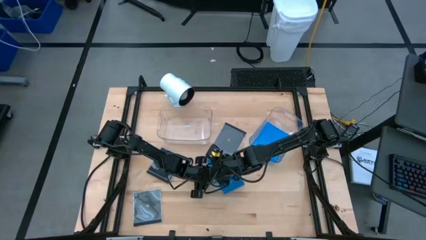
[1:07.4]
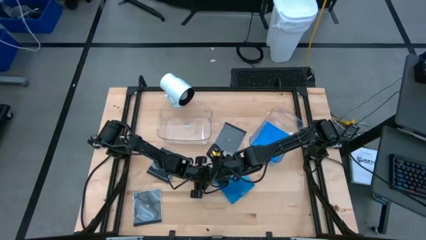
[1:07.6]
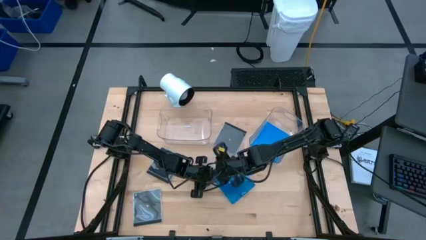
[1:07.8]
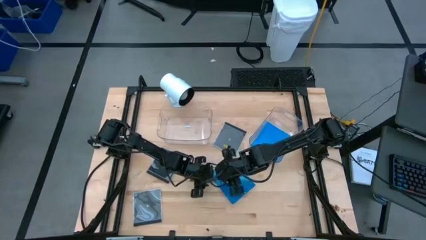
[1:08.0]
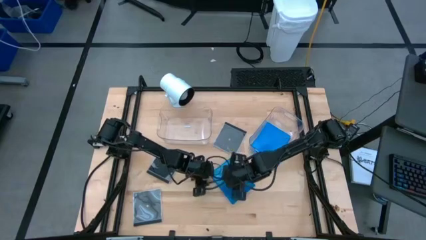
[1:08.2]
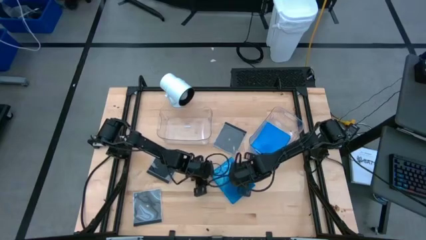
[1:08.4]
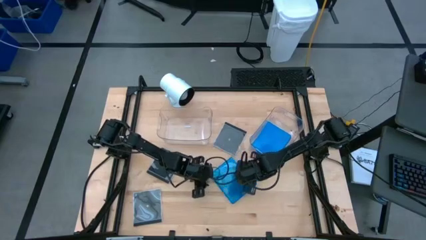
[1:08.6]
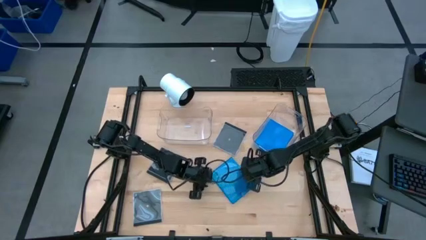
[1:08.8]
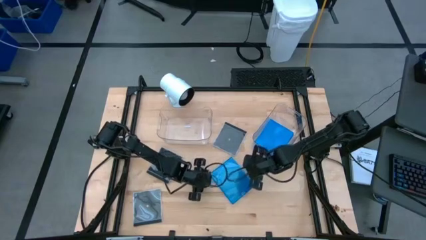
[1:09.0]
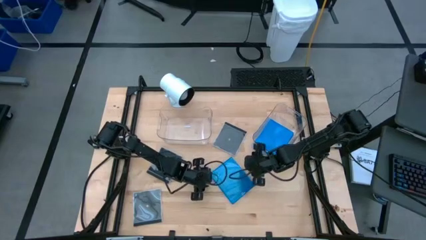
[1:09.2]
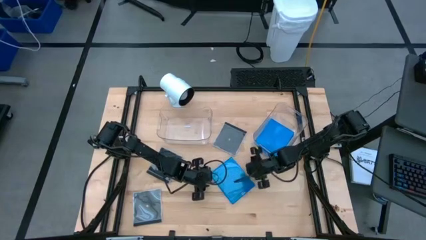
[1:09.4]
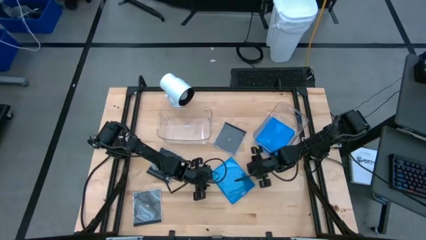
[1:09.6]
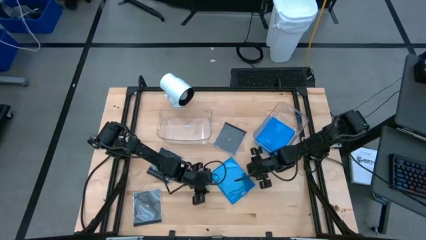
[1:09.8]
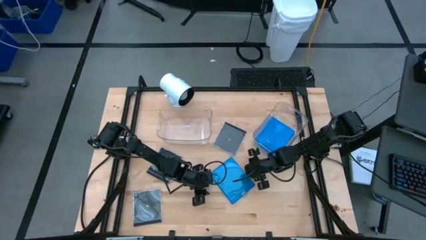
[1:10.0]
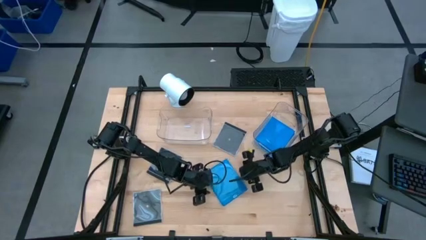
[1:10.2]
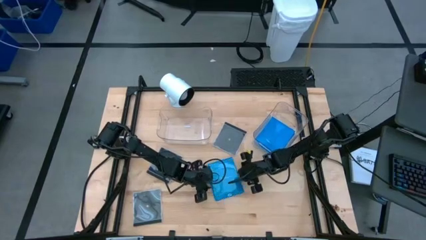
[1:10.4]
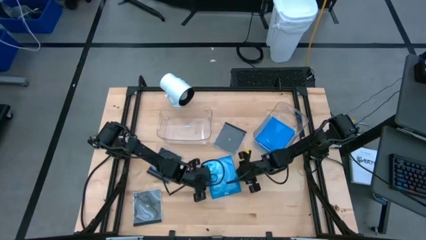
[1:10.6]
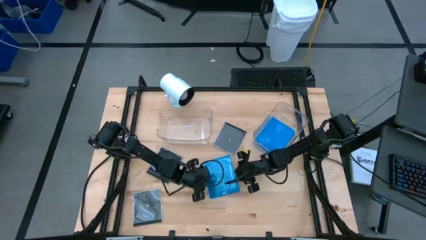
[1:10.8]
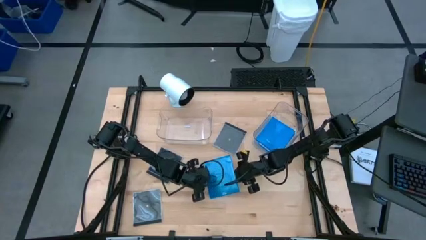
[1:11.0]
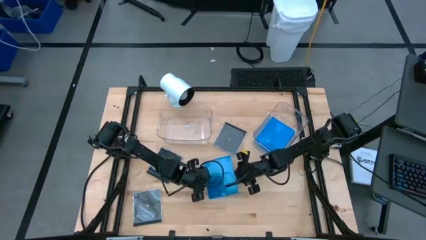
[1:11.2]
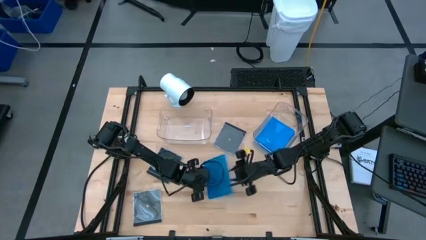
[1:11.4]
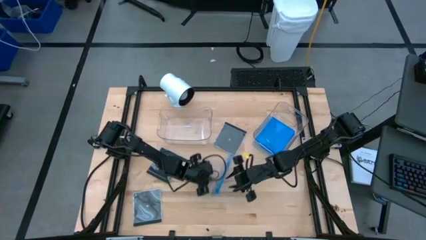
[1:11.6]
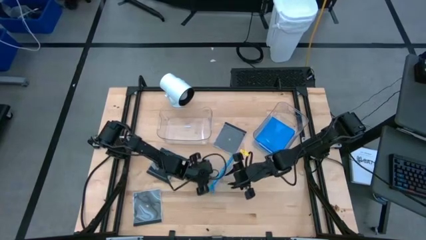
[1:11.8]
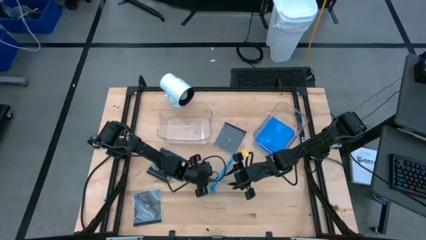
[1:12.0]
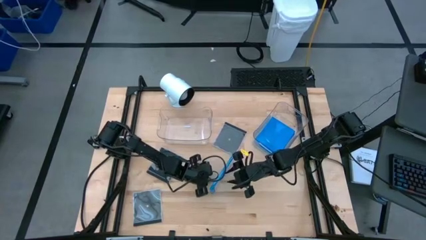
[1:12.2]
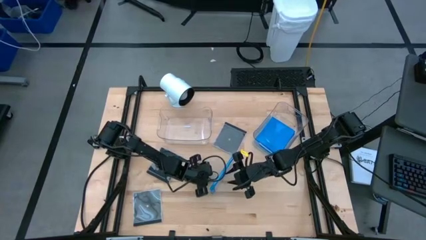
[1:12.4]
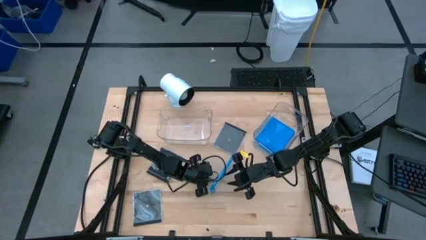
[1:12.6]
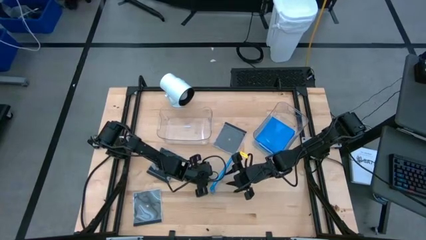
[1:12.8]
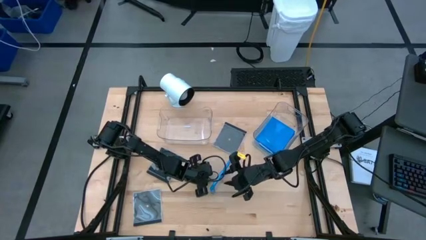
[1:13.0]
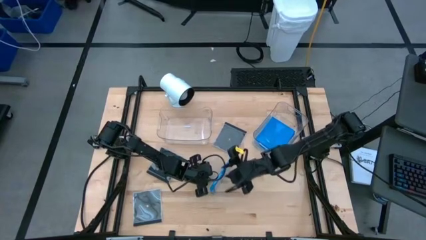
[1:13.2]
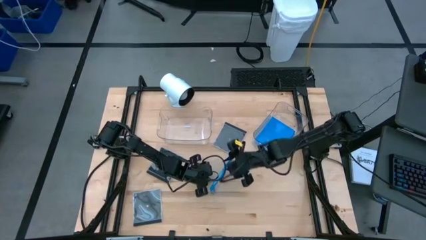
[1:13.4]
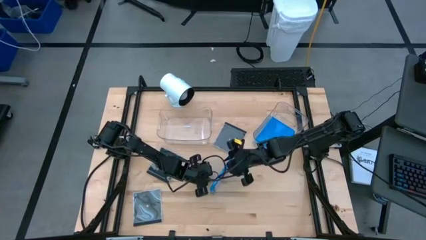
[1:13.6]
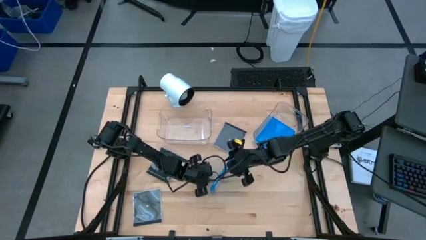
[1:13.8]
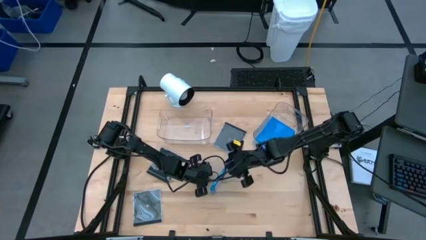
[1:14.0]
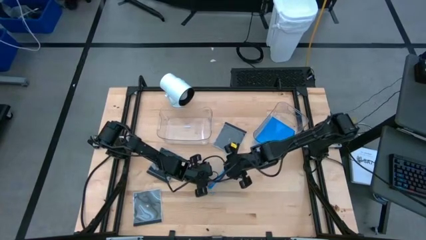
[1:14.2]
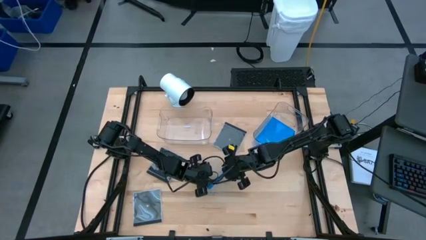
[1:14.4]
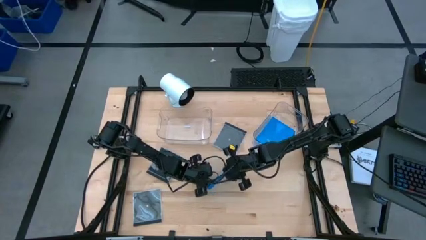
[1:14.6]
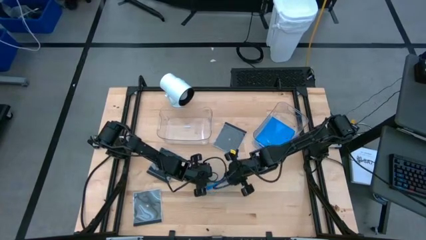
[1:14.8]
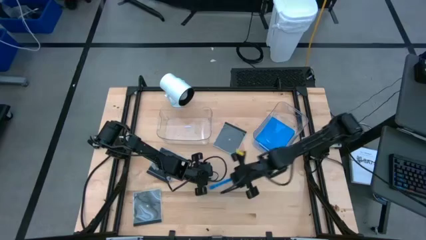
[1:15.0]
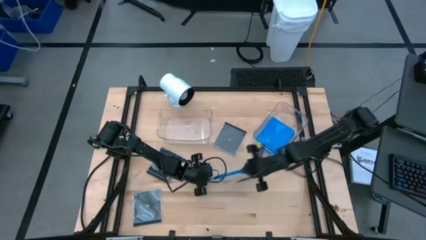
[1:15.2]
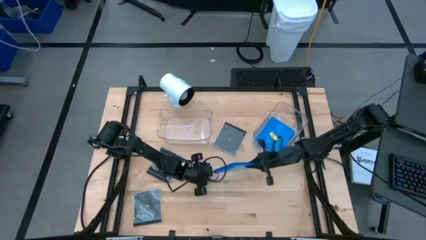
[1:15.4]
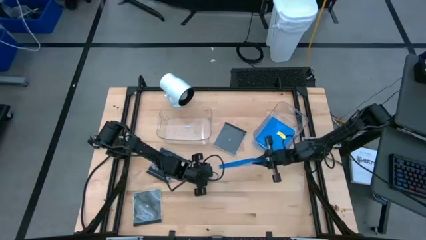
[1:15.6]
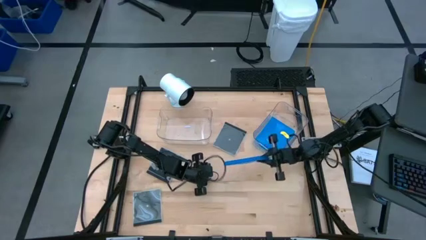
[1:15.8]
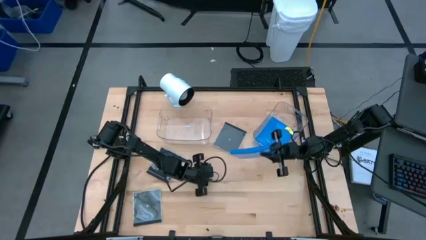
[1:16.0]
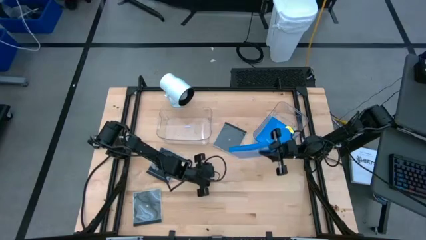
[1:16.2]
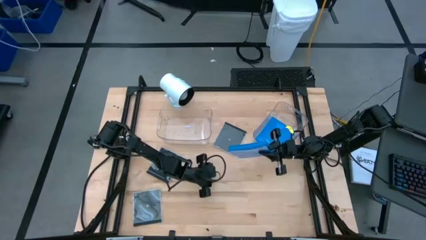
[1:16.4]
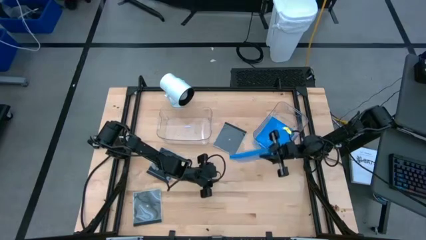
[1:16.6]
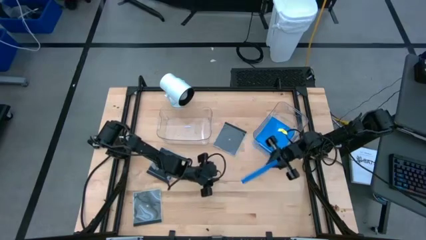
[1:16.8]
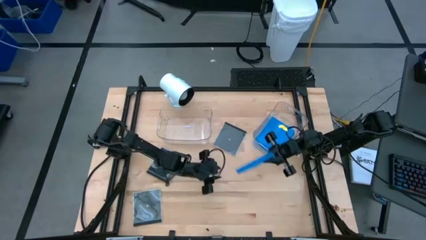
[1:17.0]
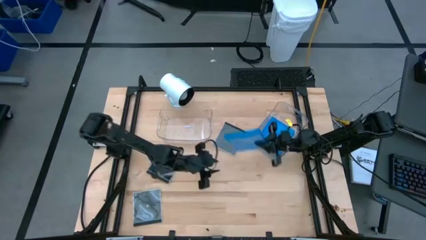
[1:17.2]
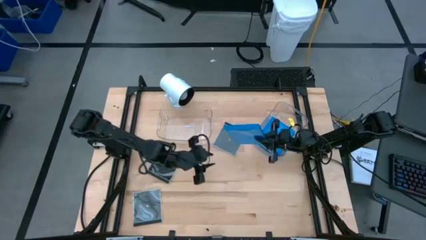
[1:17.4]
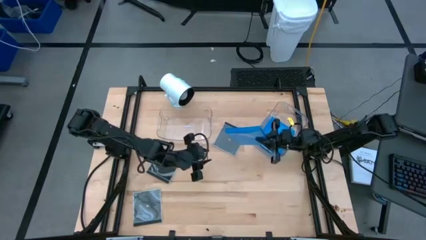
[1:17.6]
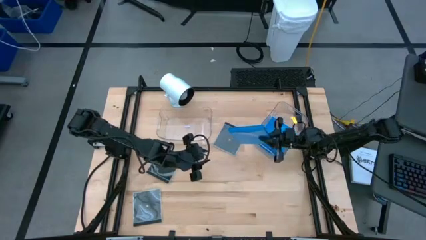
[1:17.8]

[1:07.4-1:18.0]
Task: Pick & place jewel cases by type
Put the blue cd case into the right transparent bin
